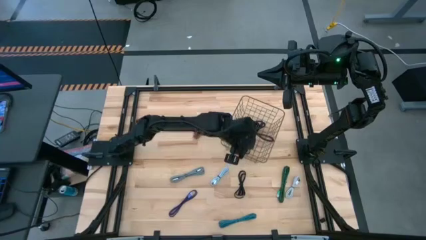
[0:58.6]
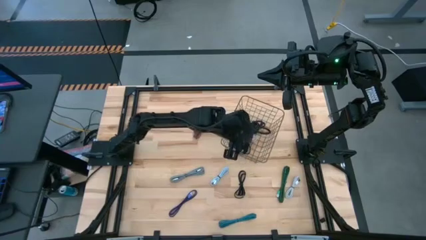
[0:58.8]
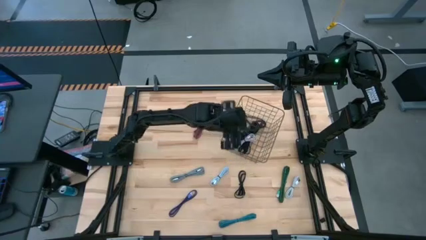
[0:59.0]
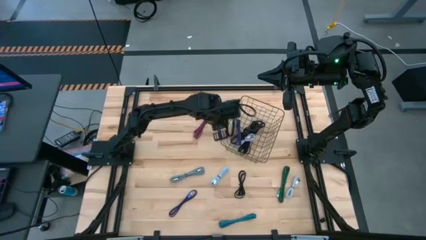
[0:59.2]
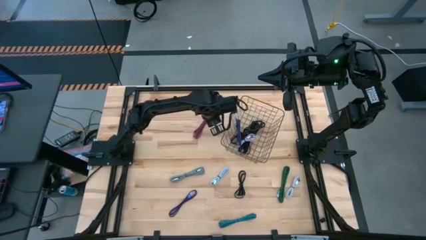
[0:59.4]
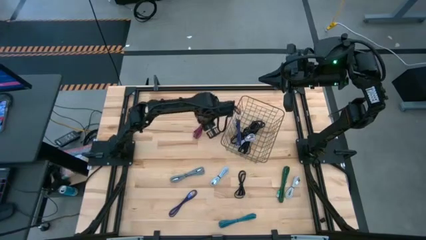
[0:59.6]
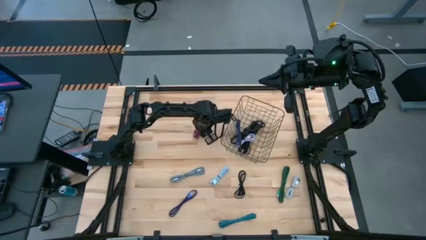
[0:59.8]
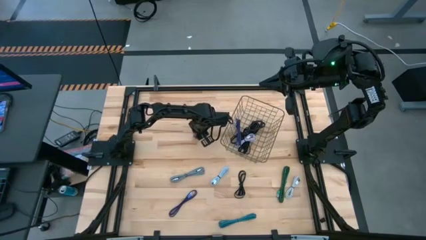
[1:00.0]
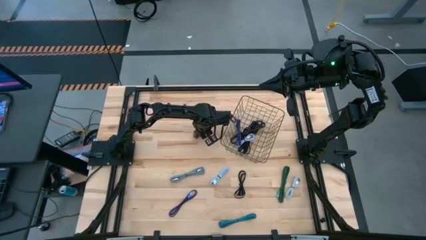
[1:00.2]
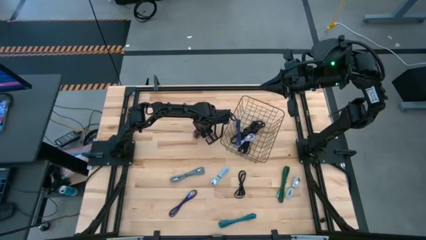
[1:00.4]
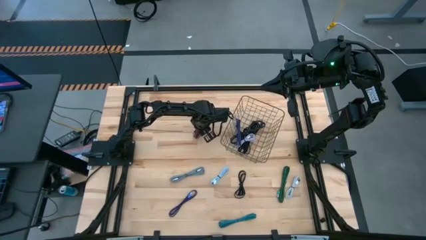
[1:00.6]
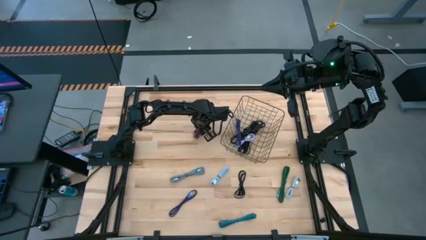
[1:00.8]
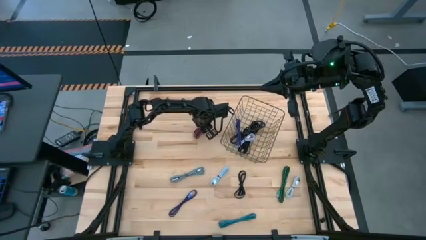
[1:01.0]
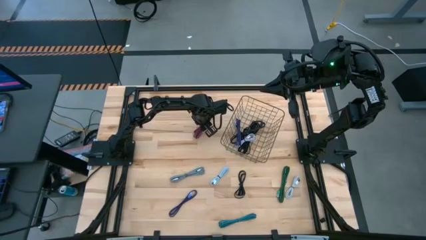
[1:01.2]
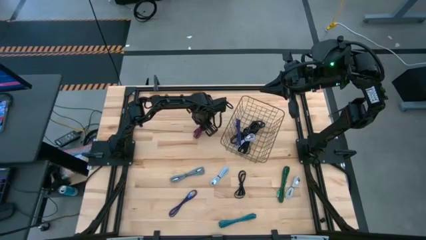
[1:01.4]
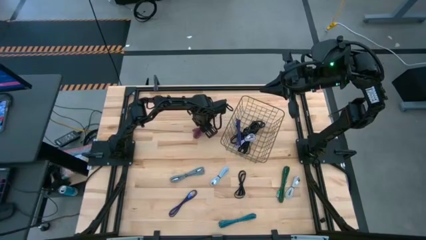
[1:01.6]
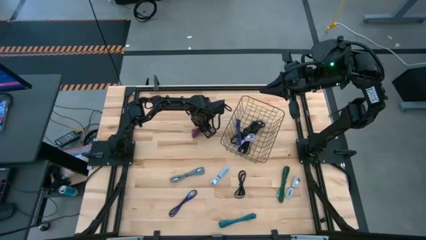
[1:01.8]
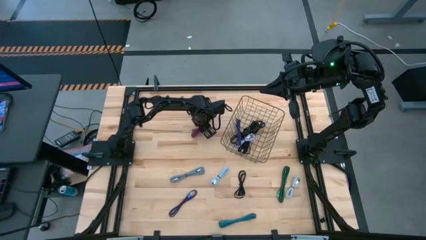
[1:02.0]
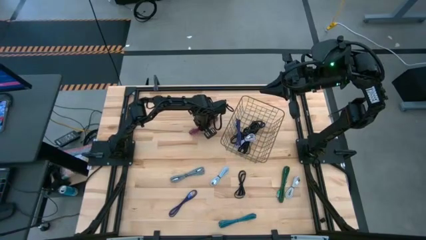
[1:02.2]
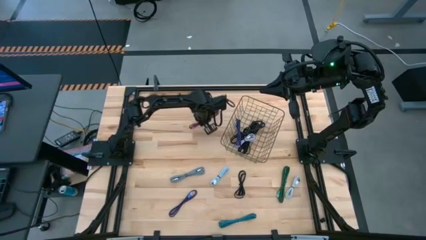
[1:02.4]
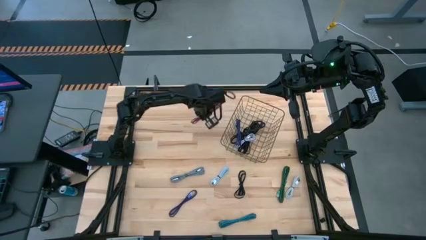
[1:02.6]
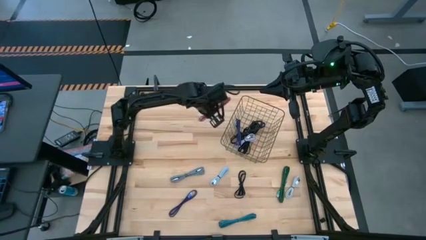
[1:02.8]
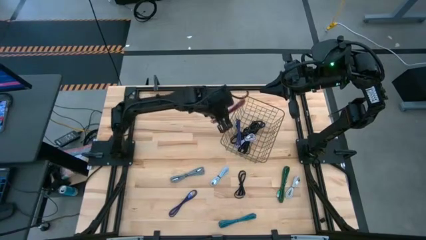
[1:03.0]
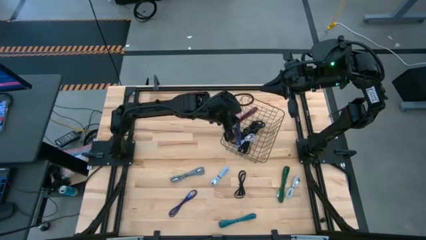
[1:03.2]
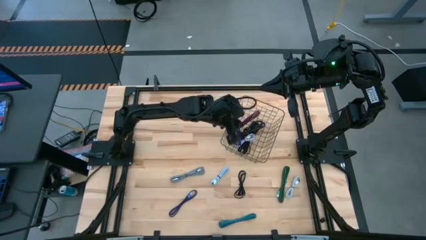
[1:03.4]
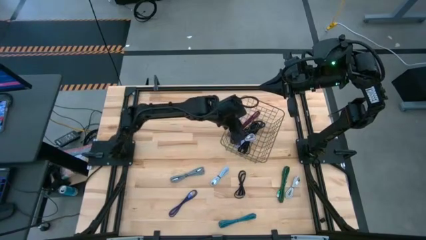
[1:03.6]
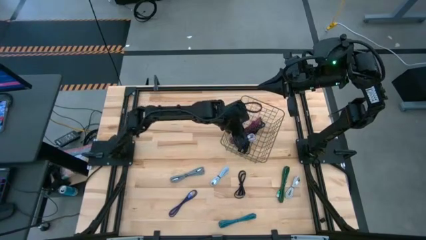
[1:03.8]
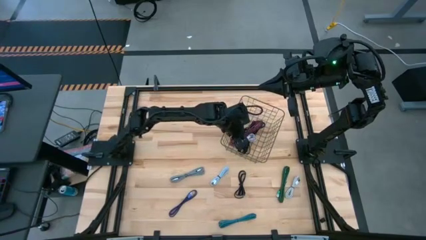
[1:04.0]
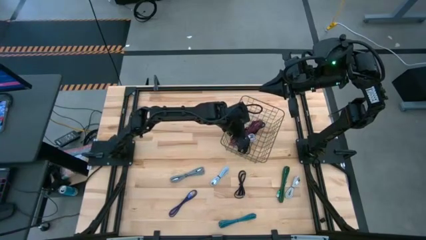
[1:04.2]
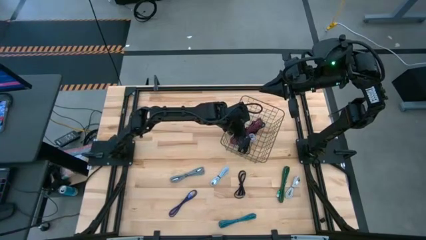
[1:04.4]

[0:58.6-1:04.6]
Task: Pick and place USB-C Cables
Put the pink patterned charger cable into the gold wire basket

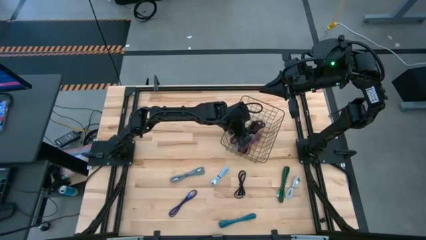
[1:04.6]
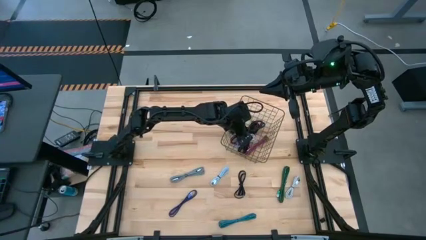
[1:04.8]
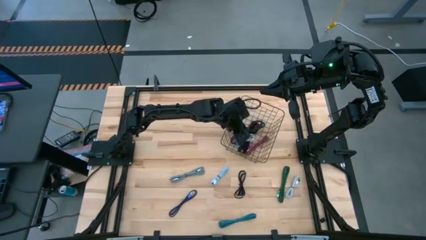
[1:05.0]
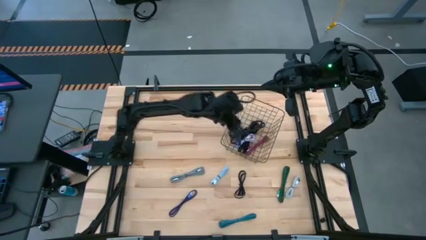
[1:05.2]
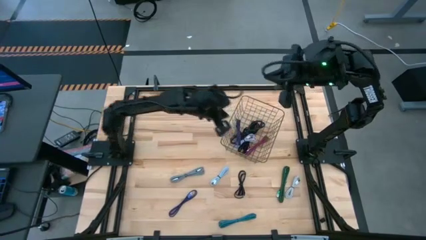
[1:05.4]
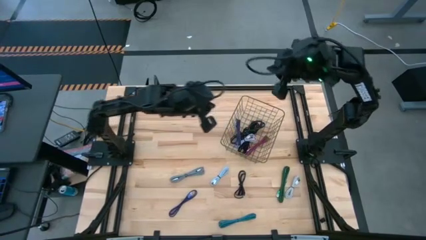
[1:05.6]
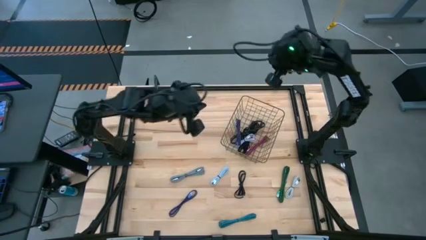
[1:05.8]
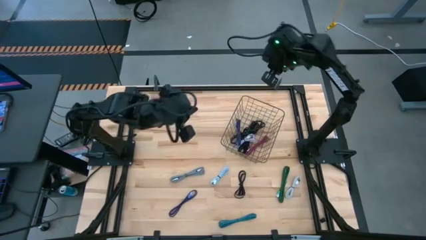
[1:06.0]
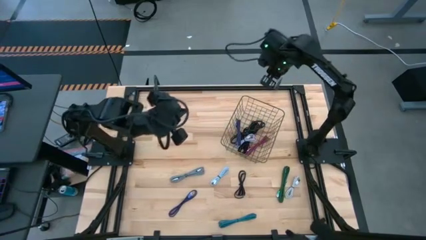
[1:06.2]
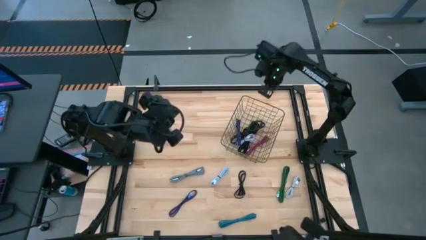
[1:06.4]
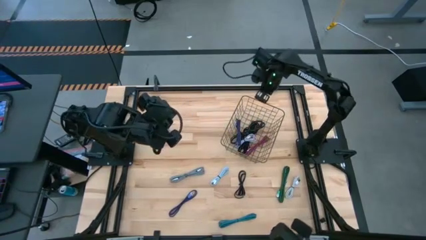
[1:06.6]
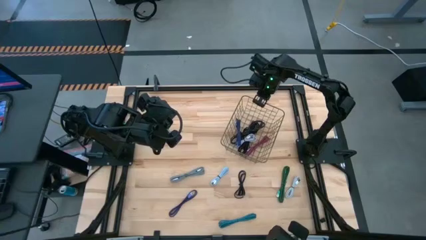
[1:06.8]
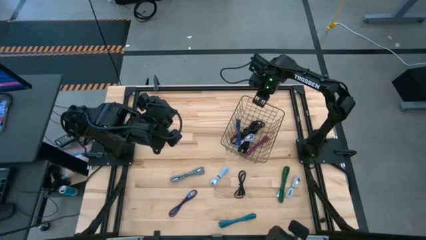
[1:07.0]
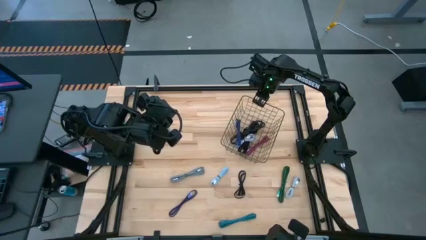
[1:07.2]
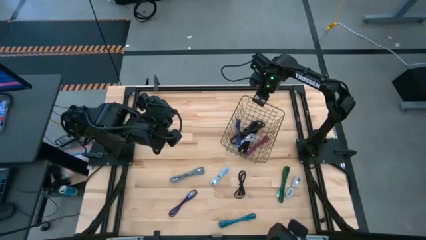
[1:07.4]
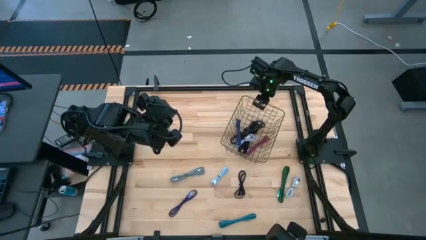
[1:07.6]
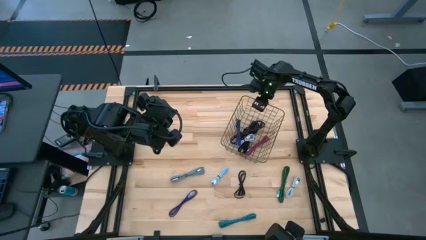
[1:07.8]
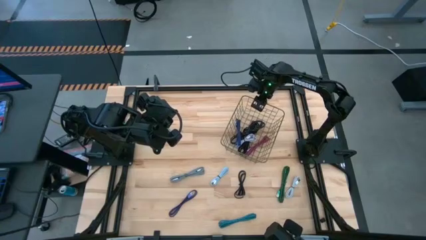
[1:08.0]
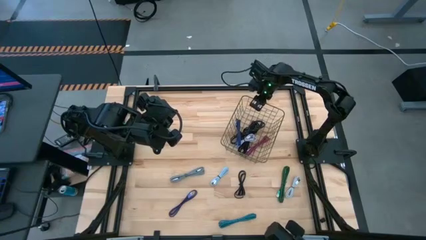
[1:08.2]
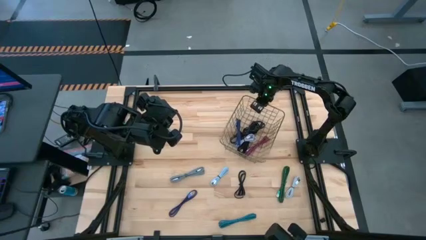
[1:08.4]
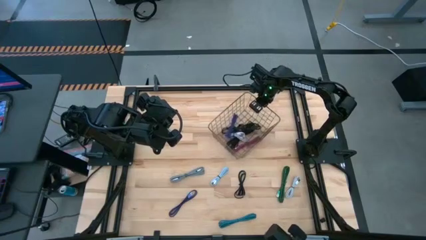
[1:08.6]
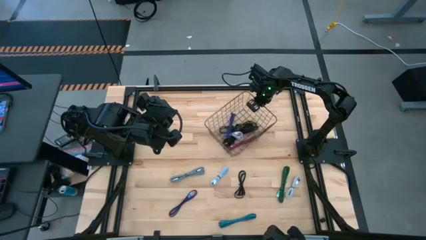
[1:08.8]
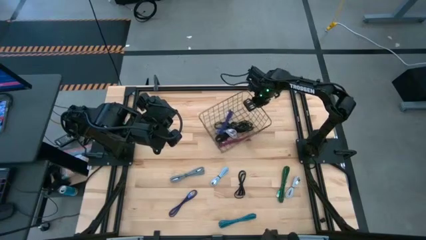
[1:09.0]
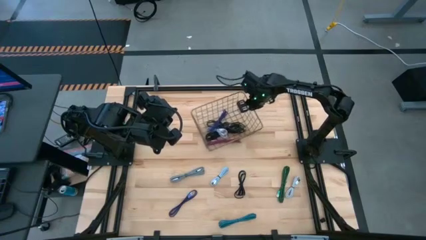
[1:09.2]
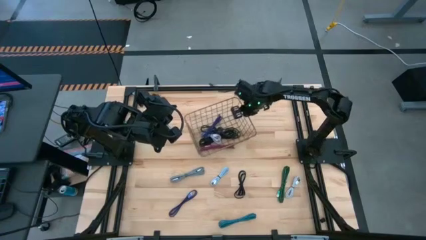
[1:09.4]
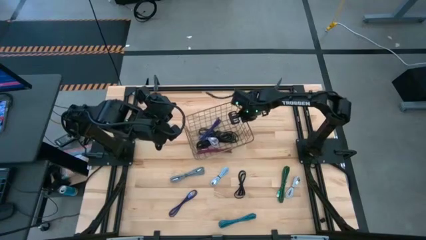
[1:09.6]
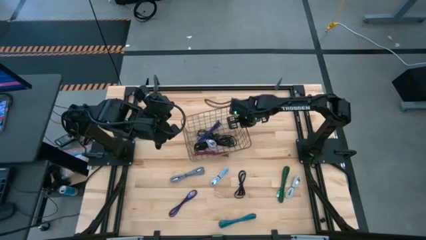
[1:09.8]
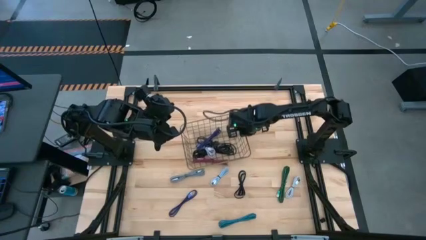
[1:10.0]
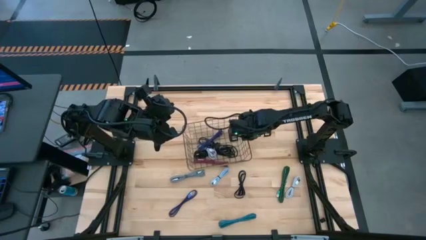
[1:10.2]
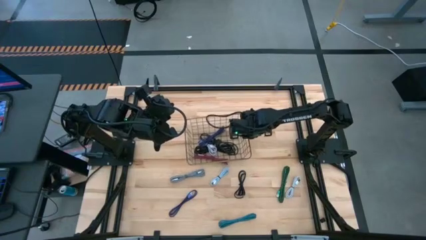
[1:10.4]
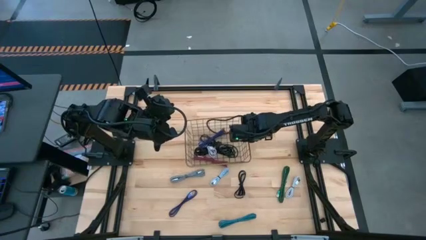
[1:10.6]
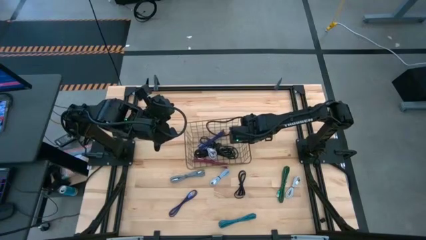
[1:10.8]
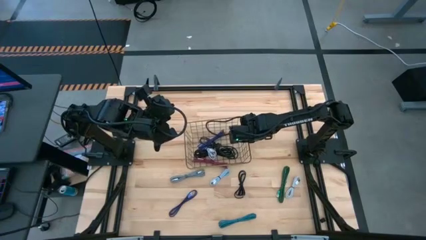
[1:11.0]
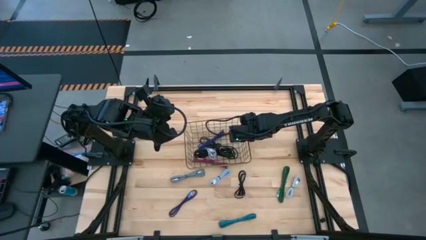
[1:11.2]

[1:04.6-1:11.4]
Move the gold wire basket to the center of the table

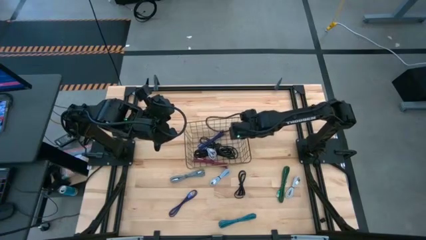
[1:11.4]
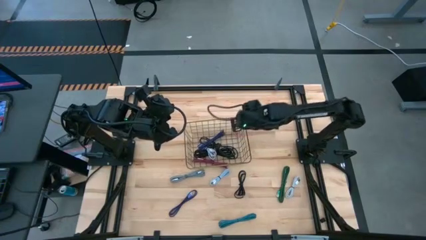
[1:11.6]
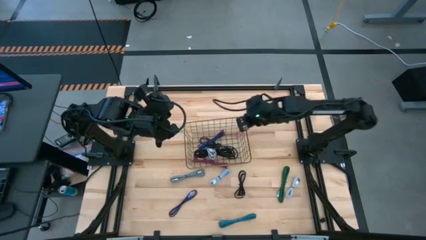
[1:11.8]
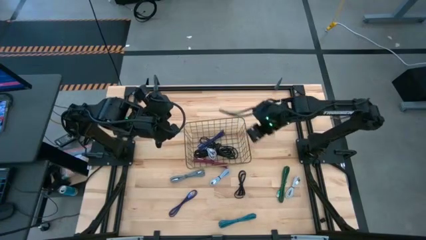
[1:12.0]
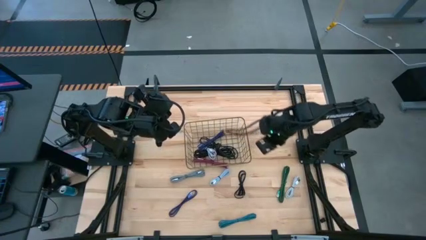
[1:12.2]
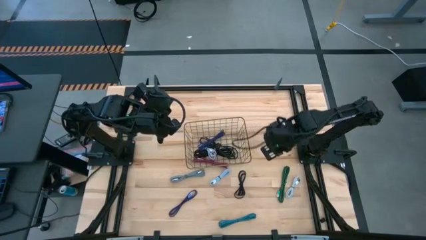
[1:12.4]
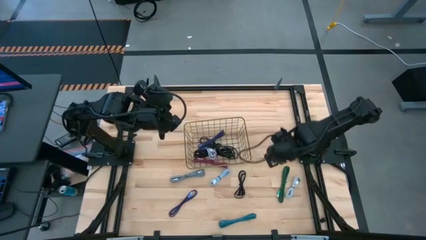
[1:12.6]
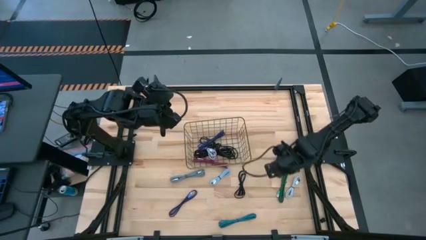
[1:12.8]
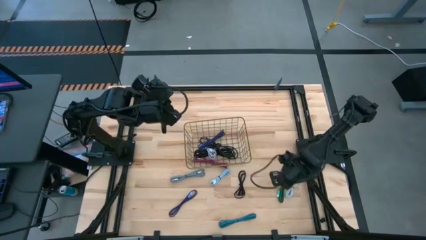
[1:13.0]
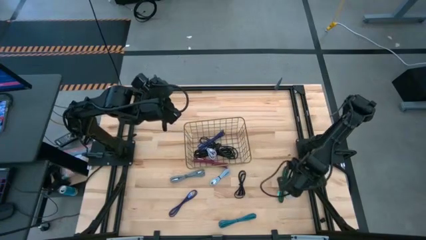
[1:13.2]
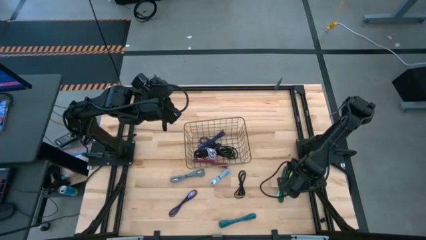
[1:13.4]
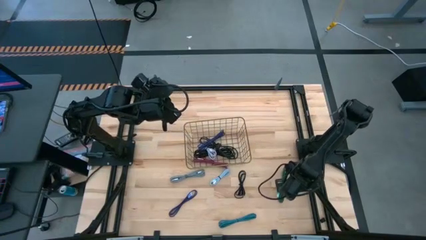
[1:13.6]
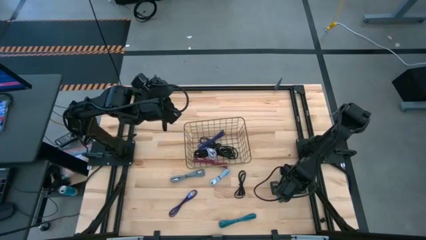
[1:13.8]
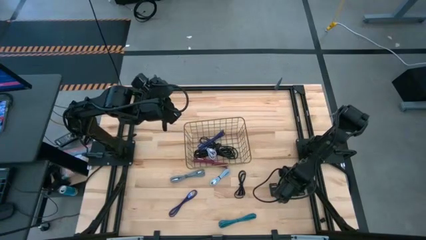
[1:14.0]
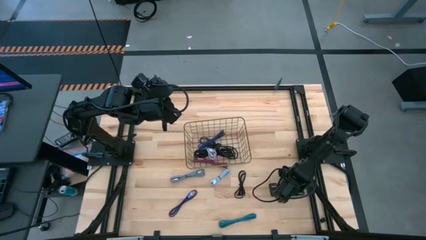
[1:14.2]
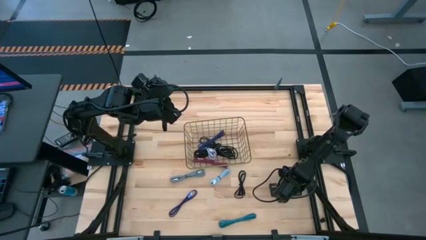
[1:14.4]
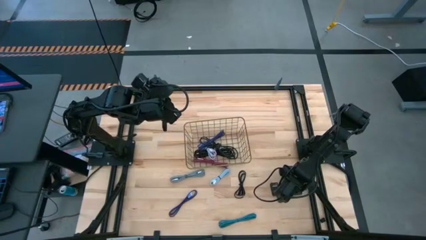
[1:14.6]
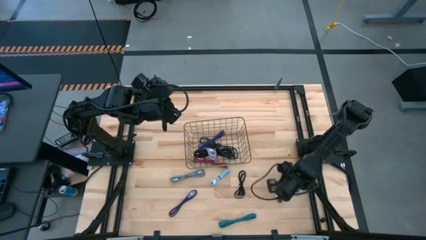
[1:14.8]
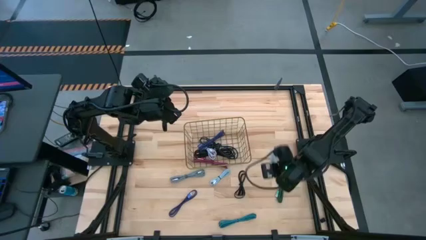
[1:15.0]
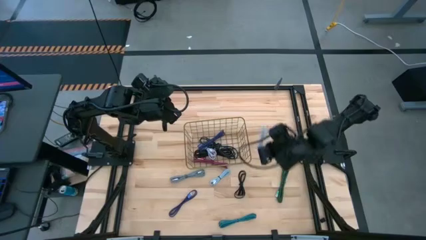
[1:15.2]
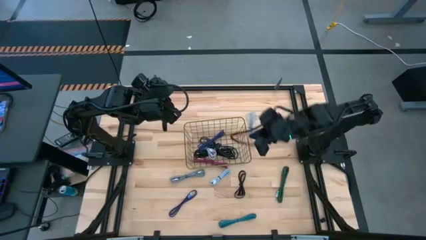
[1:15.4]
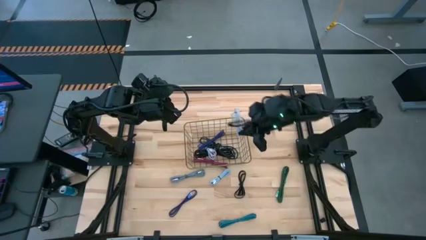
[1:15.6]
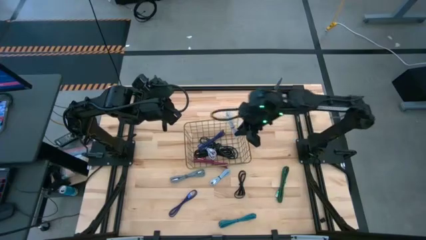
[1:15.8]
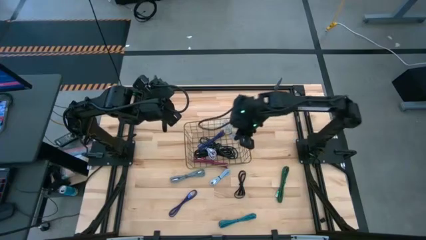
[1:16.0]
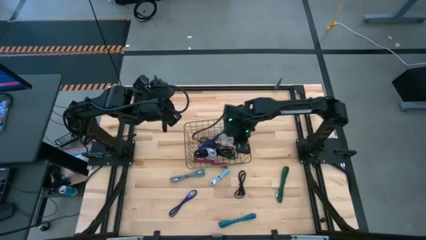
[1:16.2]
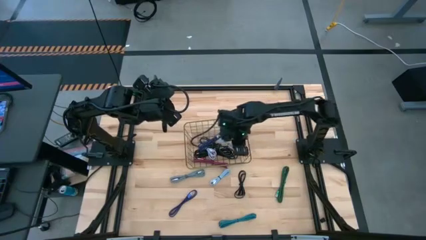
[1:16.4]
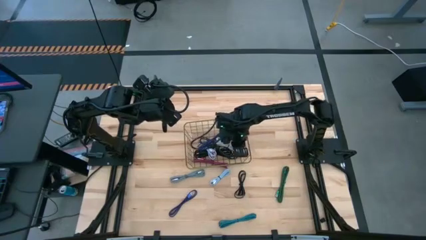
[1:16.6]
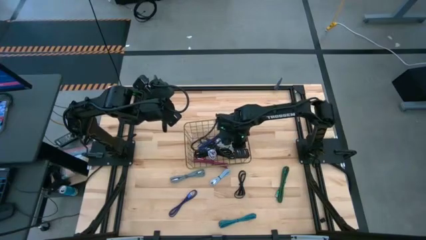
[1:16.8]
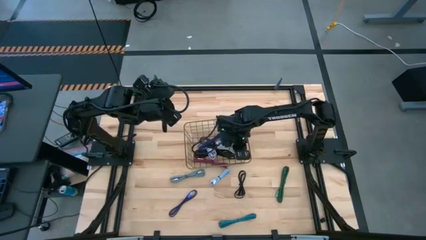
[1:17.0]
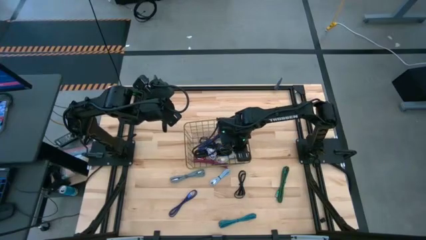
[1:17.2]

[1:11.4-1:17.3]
Put the white charger cable into the gold wire basket
